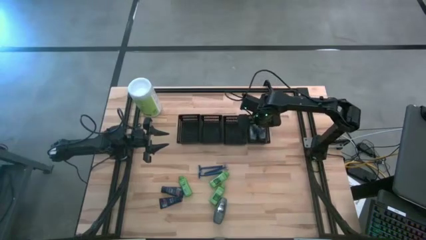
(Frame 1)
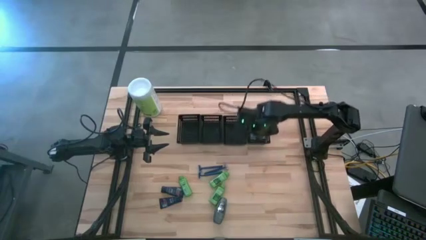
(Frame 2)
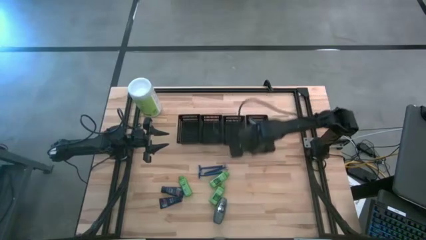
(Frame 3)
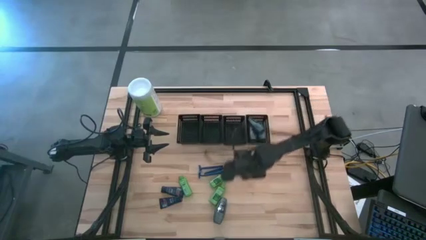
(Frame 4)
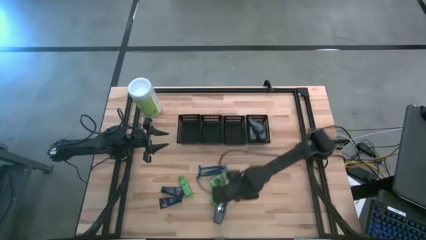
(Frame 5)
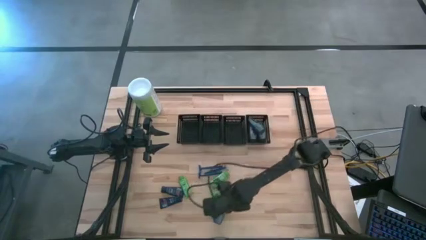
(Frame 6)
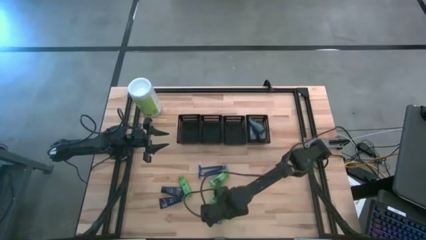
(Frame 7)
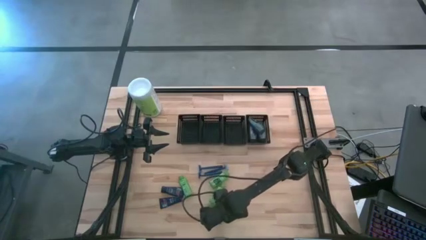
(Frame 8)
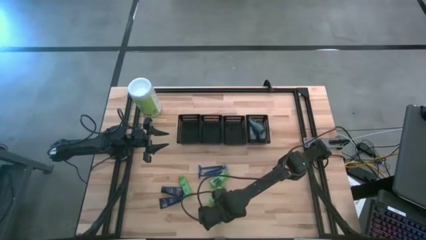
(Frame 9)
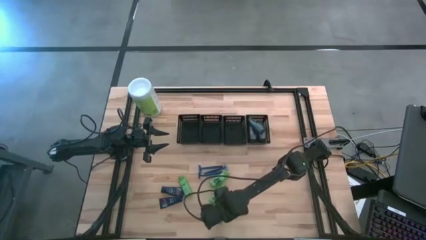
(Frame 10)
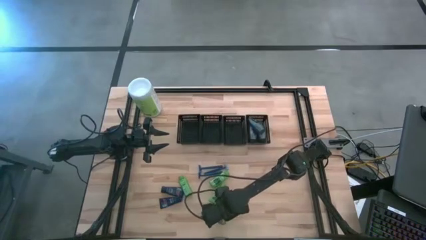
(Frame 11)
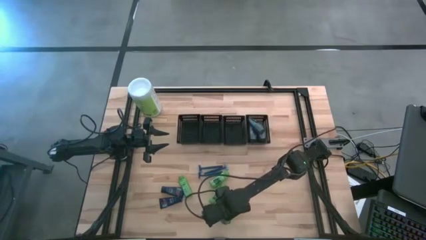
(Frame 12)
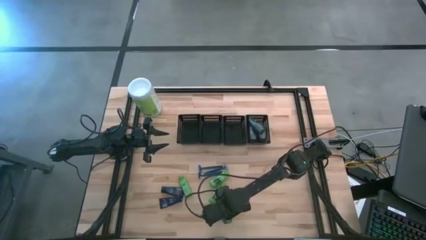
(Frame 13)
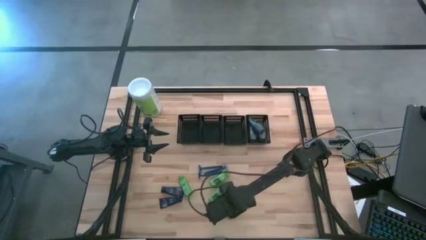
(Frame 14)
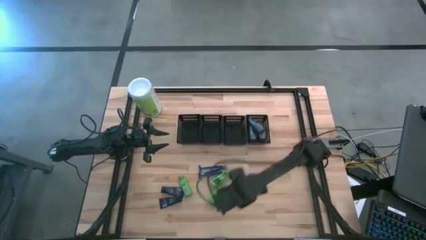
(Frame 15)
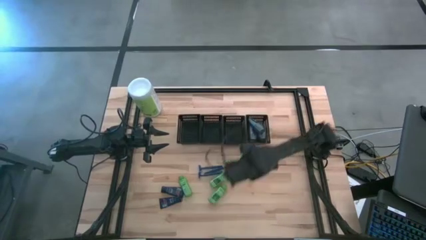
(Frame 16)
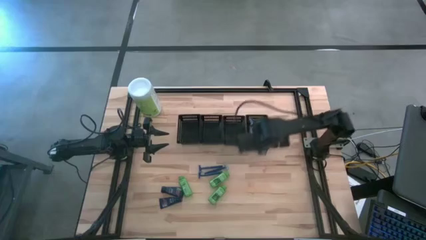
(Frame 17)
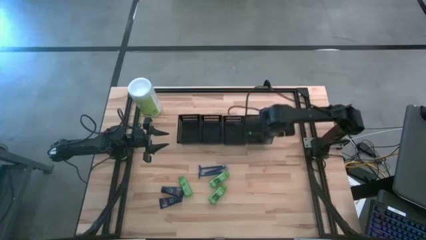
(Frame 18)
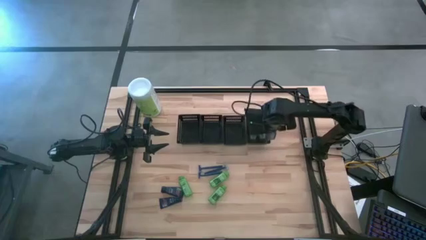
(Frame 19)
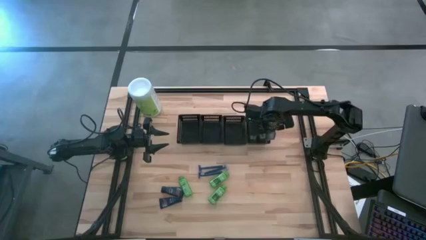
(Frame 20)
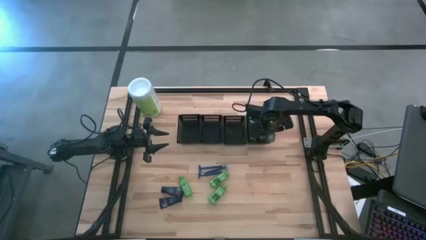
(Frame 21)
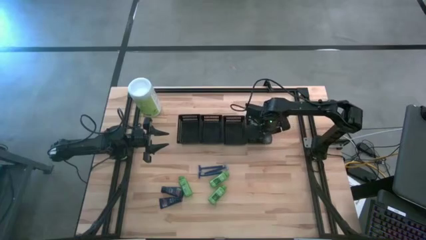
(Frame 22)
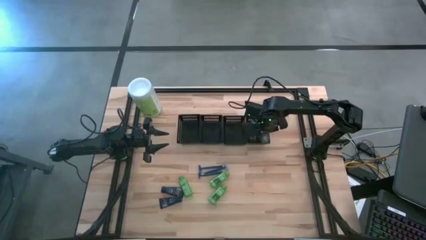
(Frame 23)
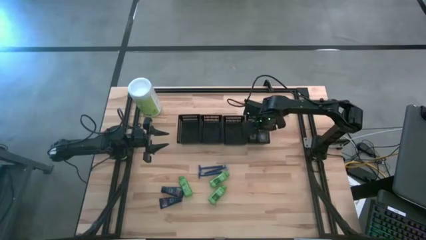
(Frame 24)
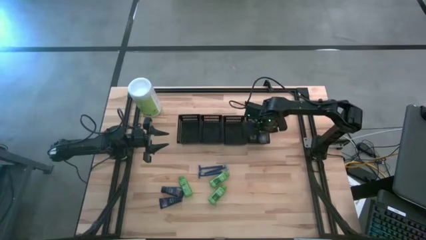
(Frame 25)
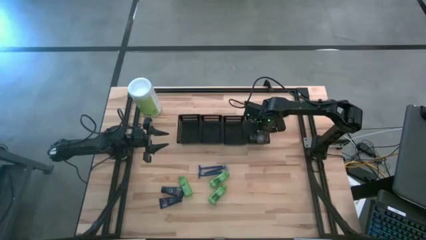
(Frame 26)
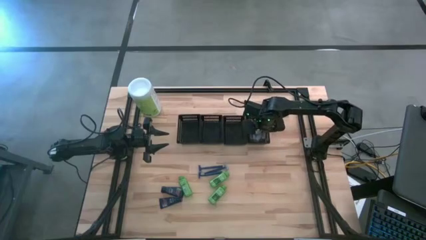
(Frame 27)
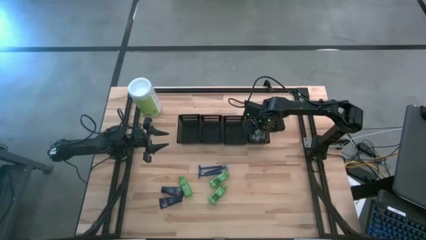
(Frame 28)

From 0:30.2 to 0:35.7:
Task: Pick & Place Travel size toiletries
Put the gray deodorant into the right black bin

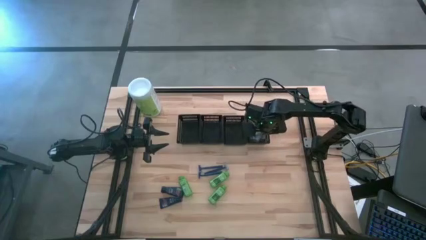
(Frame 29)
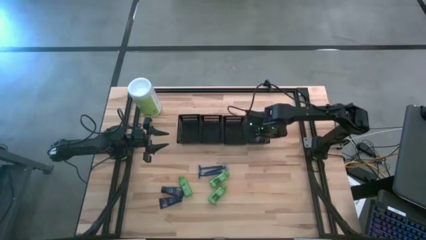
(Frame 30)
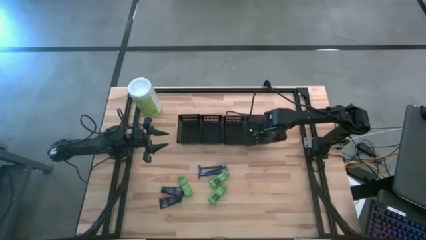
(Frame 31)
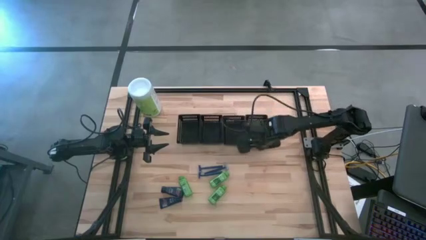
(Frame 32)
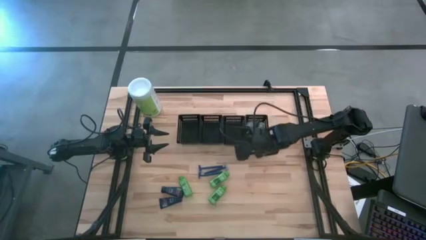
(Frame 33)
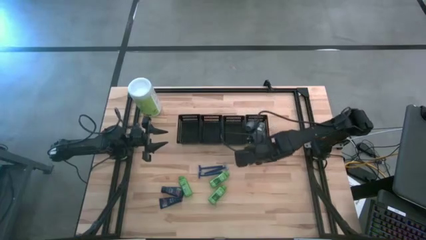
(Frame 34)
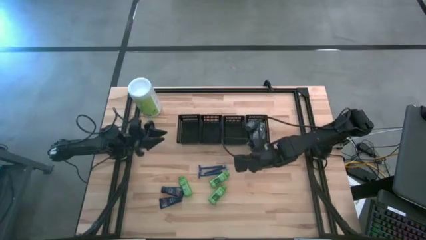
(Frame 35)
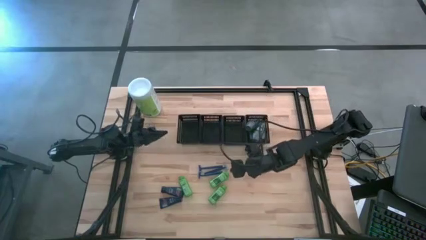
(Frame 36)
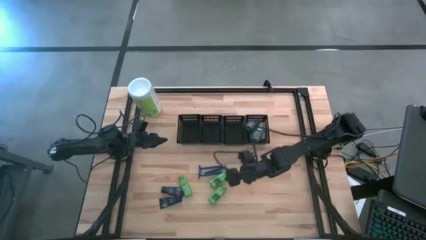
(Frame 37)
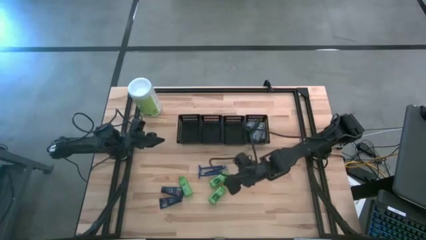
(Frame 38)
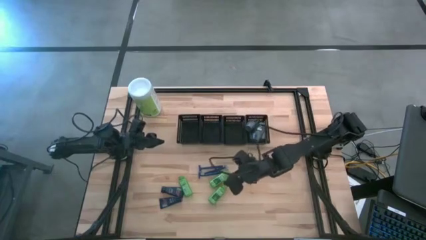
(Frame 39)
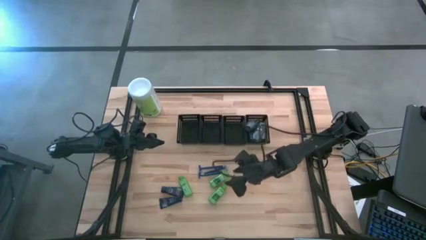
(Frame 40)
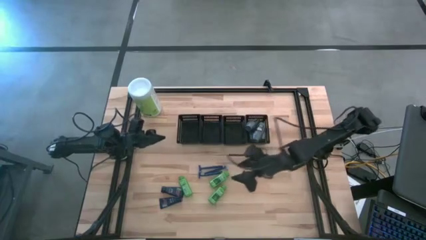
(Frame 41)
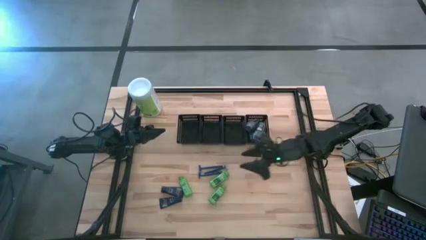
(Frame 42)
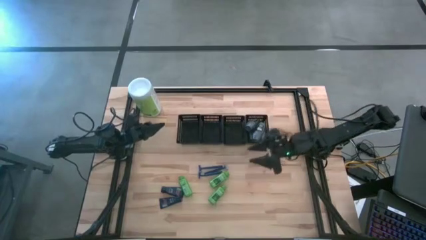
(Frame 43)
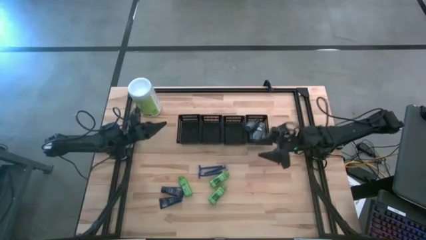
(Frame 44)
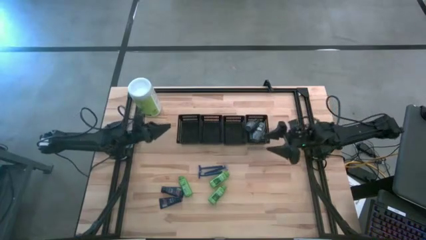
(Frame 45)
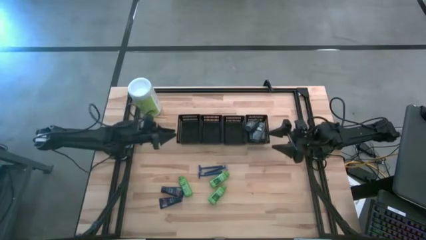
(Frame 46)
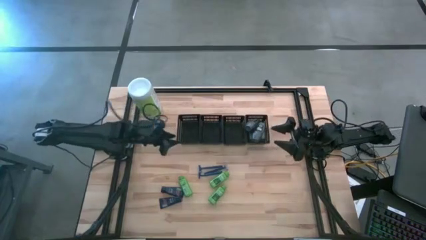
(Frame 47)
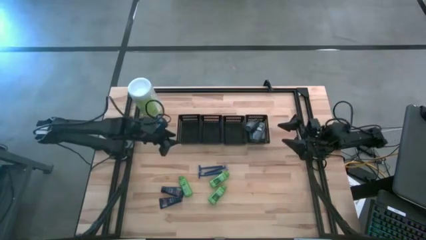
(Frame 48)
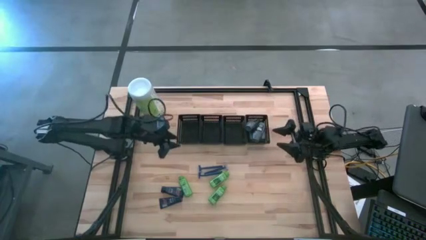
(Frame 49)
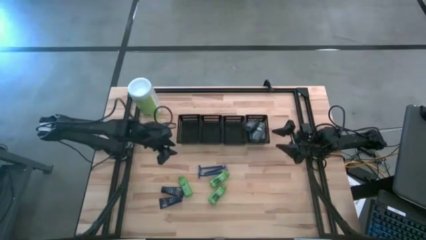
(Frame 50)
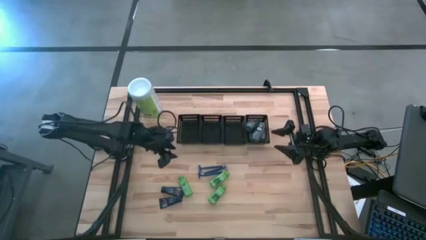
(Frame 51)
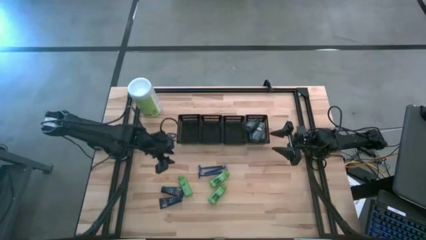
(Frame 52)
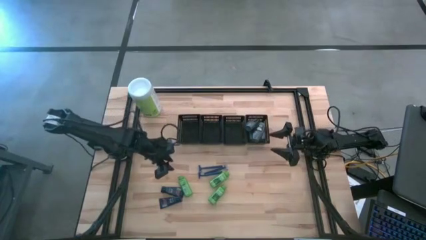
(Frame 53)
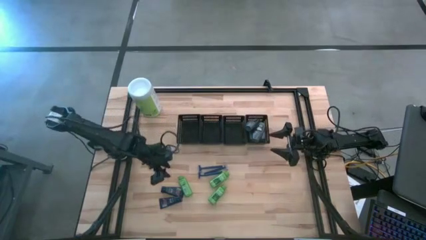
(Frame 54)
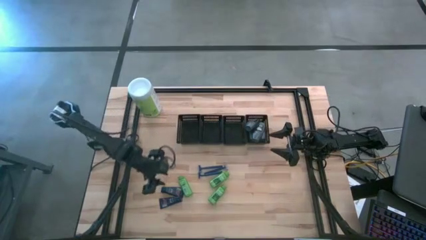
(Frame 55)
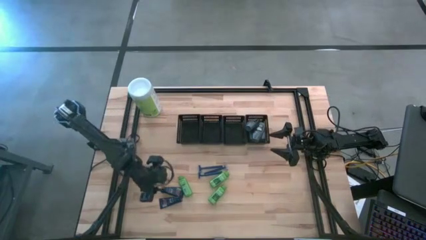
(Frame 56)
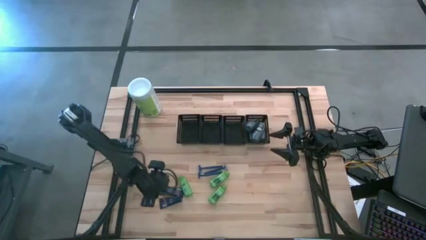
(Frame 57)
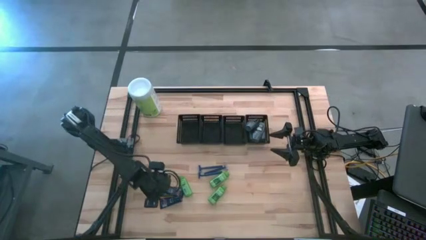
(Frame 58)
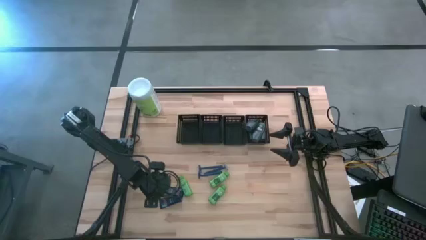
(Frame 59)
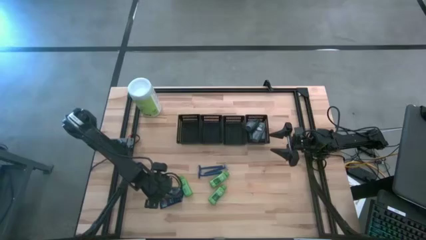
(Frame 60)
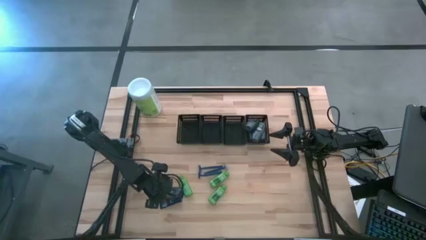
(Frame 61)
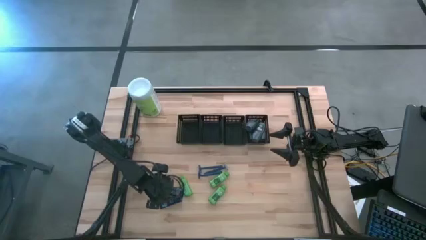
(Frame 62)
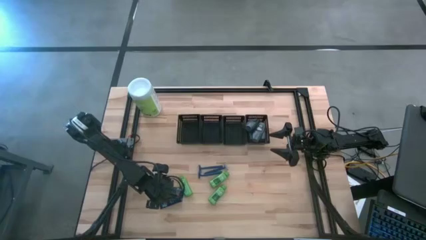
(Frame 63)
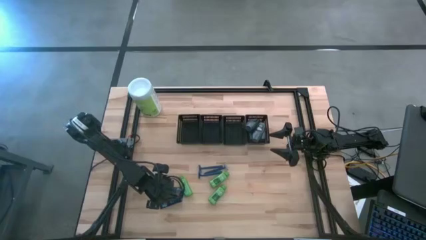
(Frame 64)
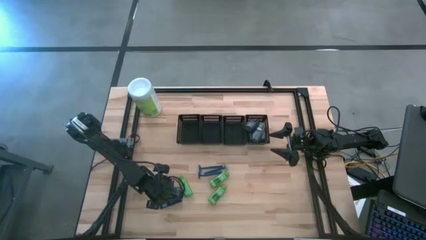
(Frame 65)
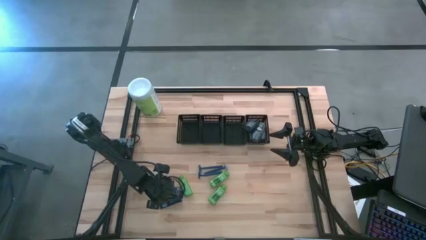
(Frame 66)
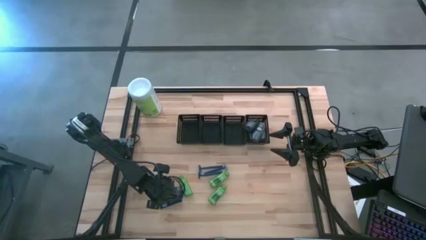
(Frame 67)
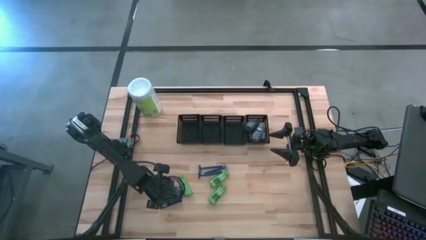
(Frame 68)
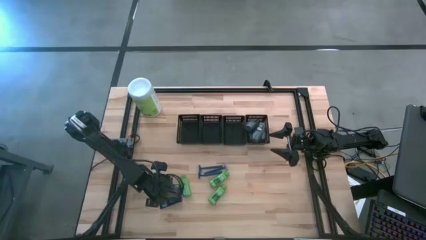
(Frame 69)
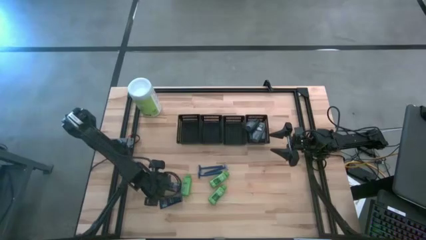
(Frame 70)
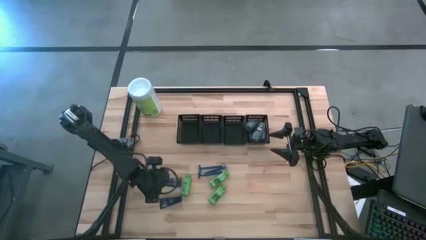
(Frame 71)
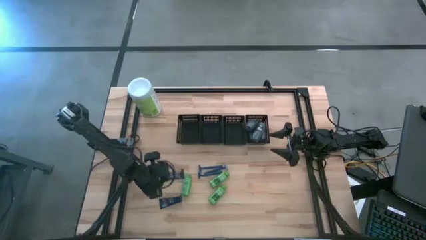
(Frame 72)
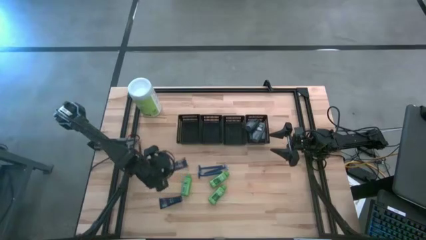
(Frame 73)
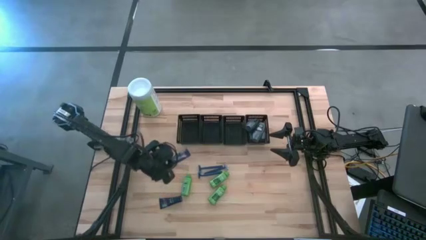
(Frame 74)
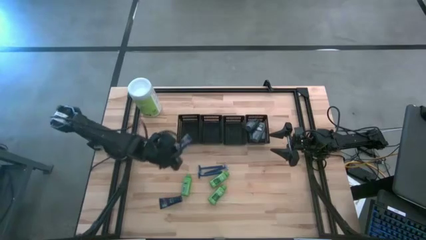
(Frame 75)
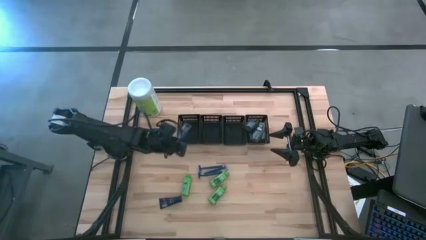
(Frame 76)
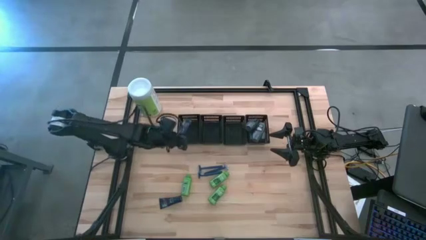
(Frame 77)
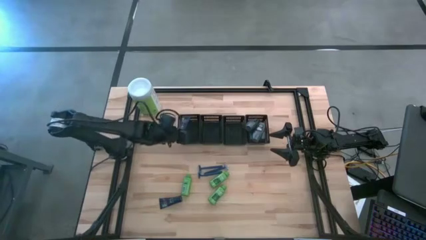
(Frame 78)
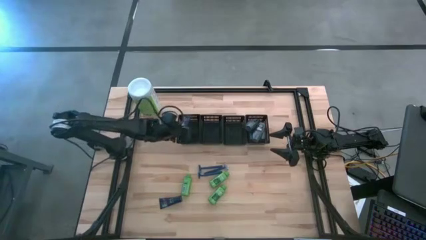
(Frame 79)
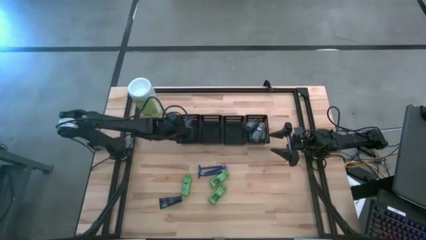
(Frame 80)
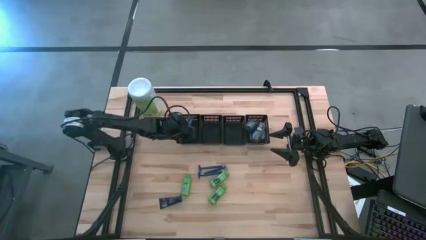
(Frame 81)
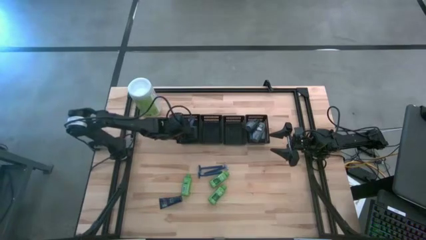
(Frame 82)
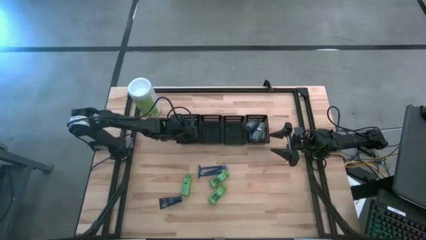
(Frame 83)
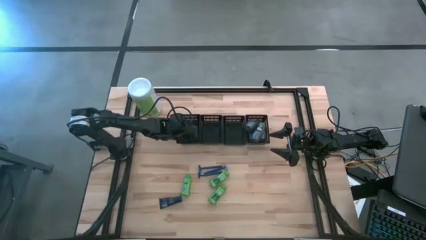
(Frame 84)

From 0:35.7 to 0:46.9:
Put the blue shave cream into the left black bin
